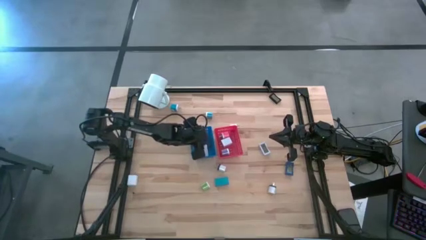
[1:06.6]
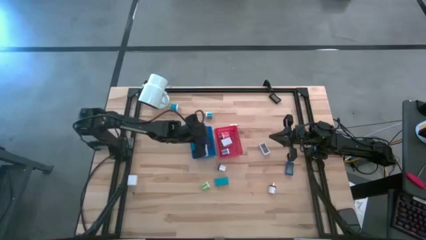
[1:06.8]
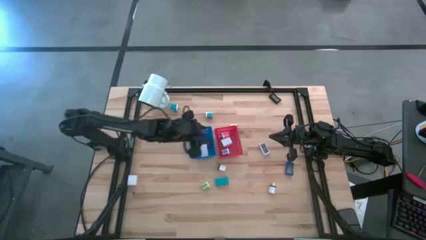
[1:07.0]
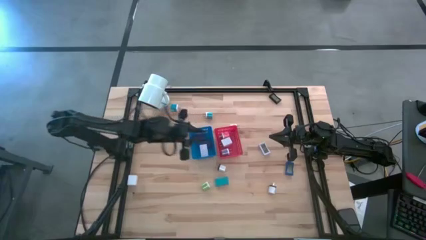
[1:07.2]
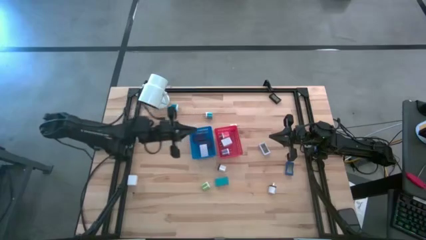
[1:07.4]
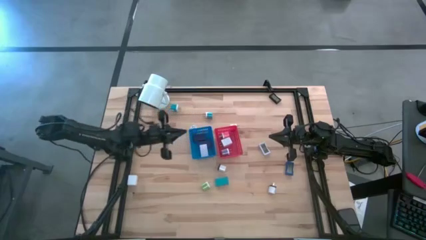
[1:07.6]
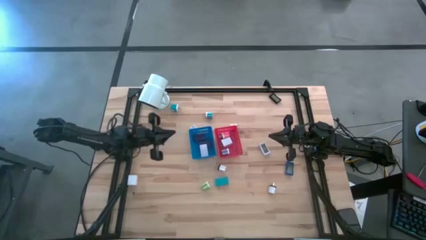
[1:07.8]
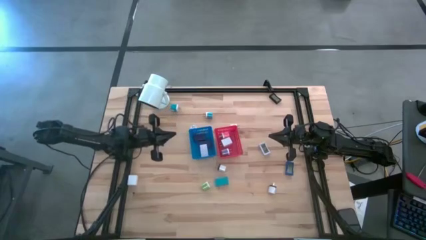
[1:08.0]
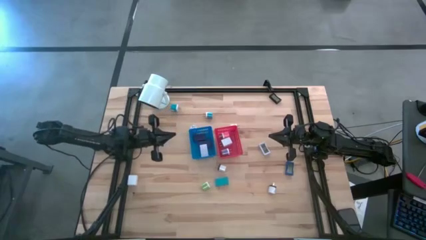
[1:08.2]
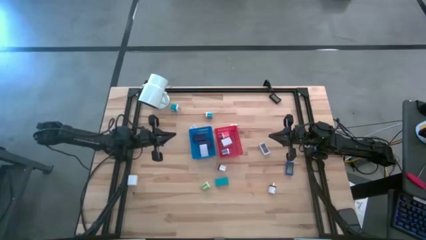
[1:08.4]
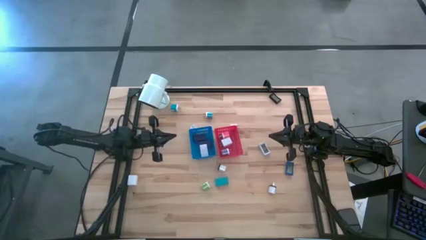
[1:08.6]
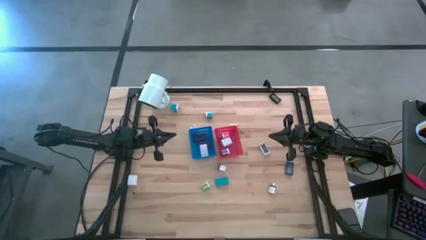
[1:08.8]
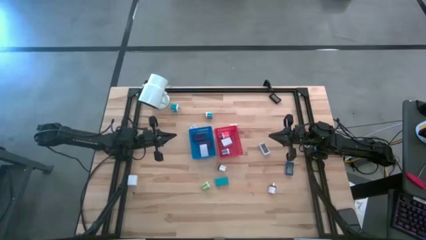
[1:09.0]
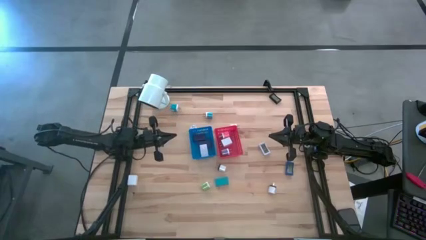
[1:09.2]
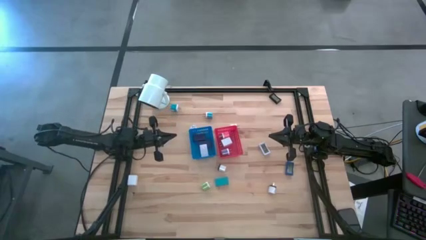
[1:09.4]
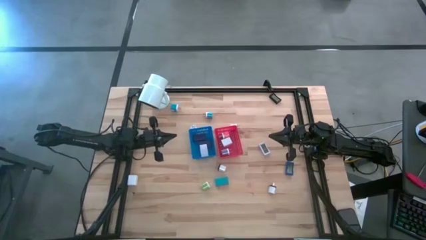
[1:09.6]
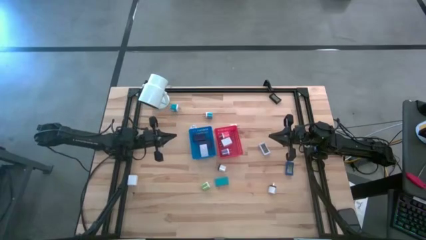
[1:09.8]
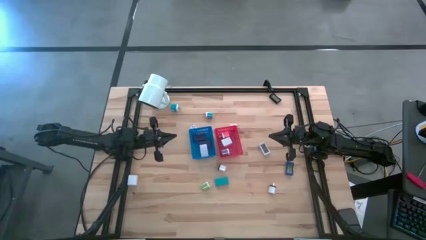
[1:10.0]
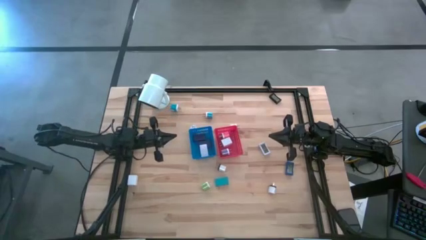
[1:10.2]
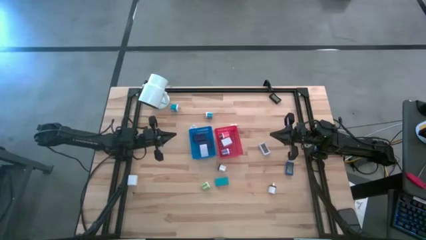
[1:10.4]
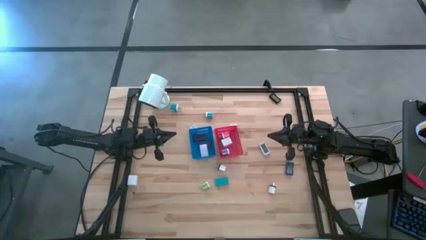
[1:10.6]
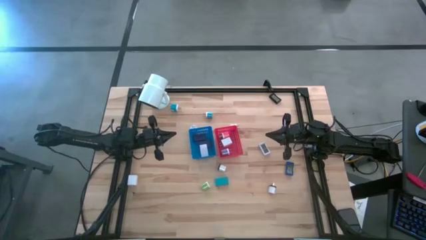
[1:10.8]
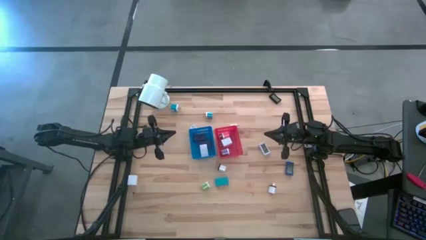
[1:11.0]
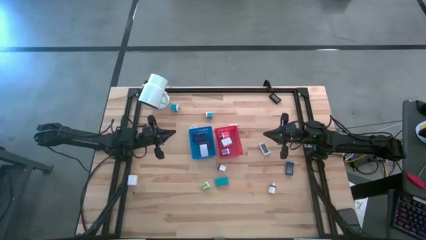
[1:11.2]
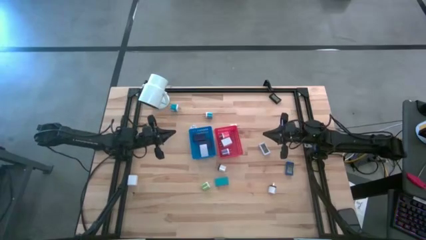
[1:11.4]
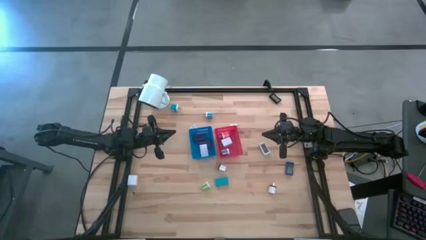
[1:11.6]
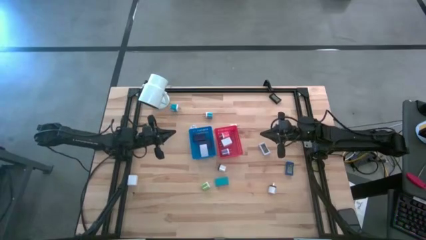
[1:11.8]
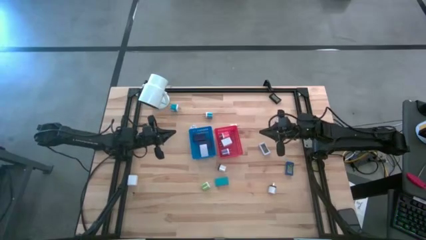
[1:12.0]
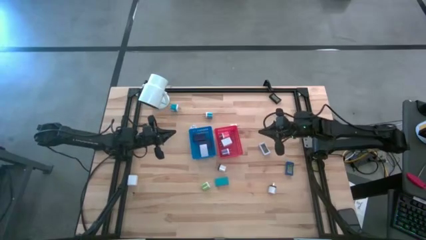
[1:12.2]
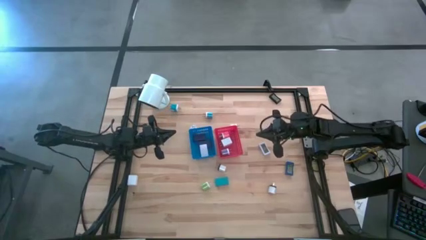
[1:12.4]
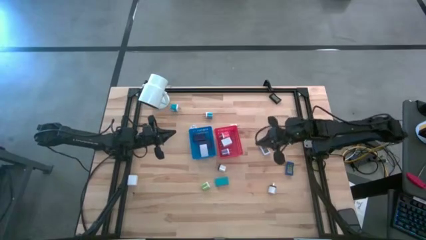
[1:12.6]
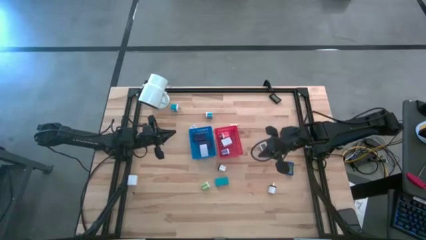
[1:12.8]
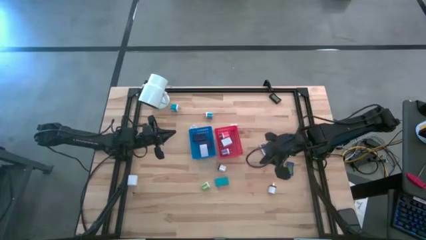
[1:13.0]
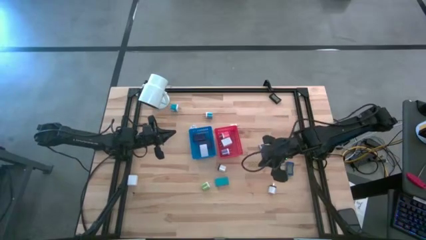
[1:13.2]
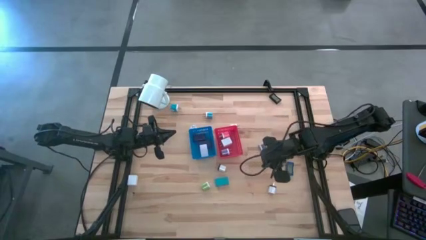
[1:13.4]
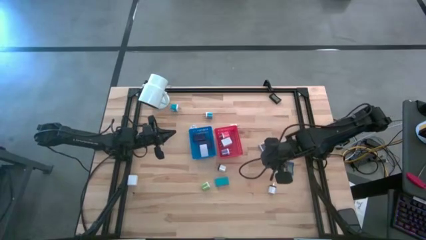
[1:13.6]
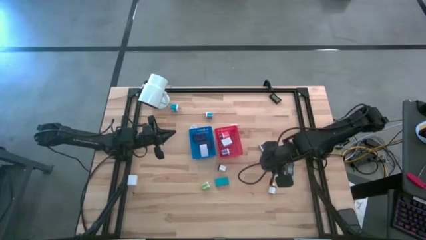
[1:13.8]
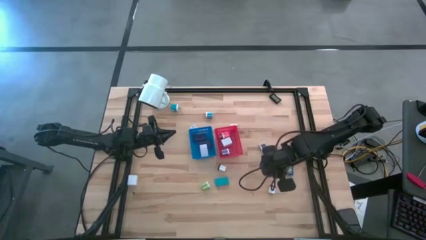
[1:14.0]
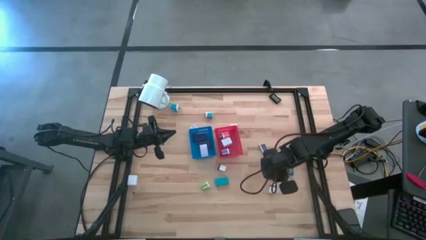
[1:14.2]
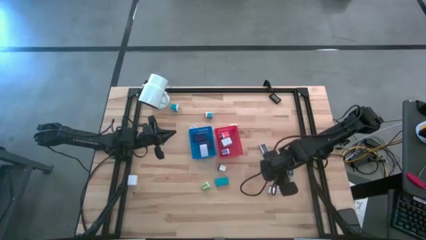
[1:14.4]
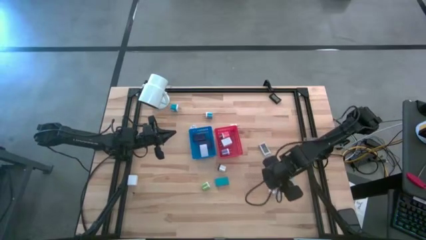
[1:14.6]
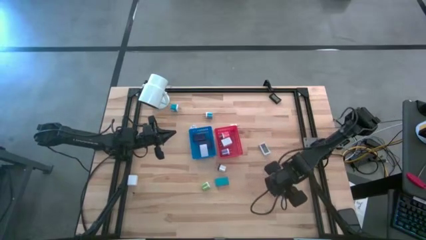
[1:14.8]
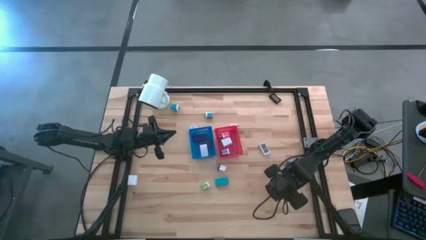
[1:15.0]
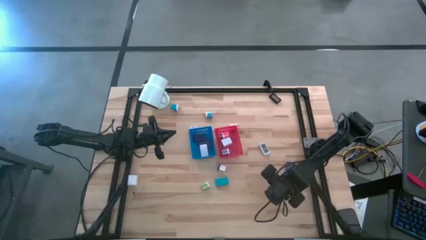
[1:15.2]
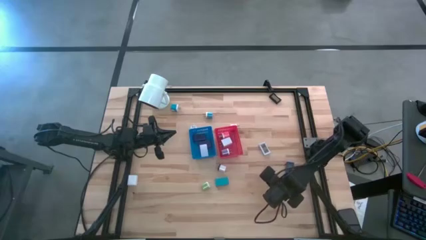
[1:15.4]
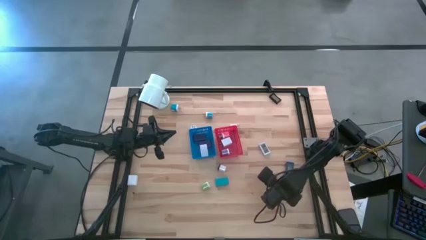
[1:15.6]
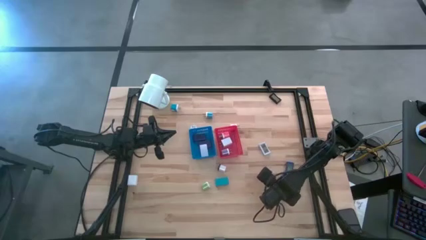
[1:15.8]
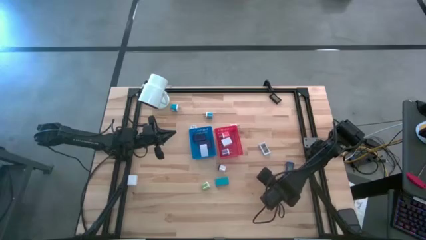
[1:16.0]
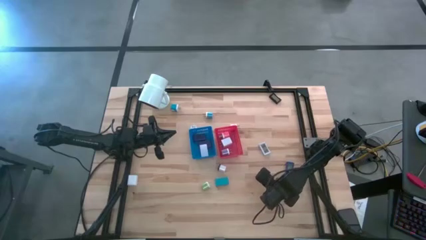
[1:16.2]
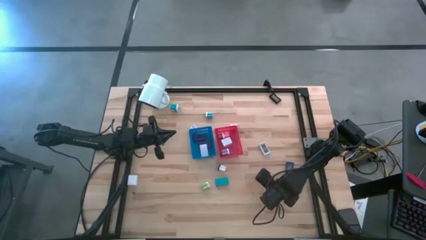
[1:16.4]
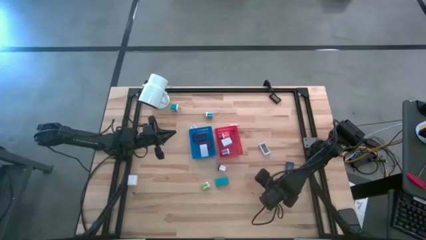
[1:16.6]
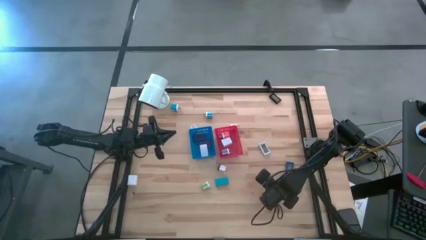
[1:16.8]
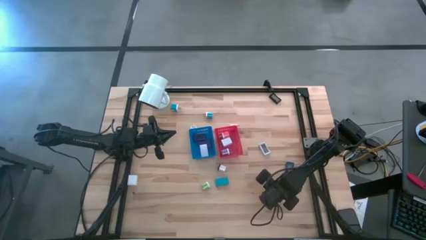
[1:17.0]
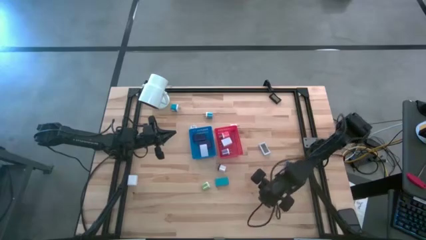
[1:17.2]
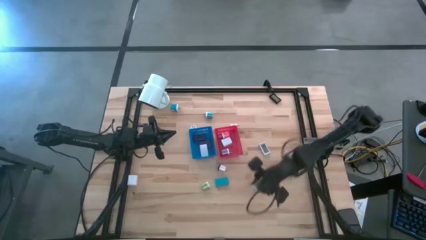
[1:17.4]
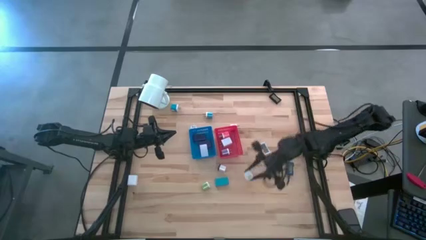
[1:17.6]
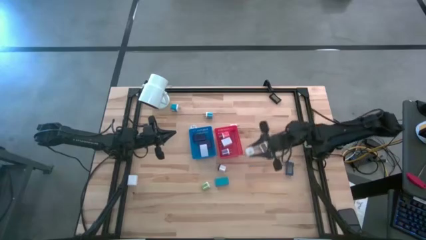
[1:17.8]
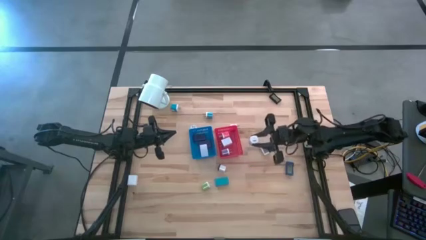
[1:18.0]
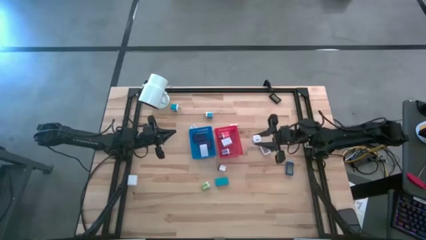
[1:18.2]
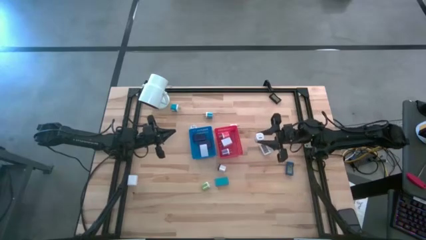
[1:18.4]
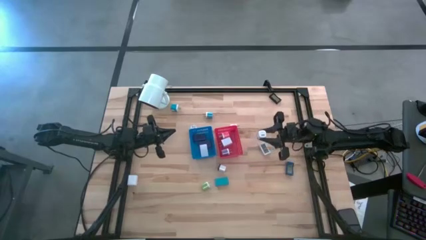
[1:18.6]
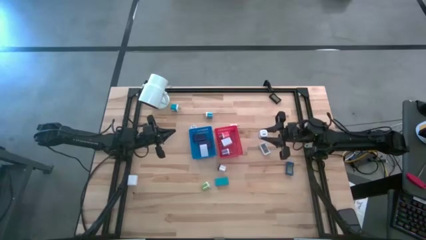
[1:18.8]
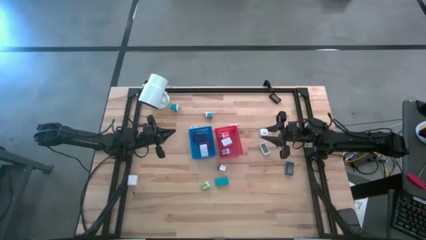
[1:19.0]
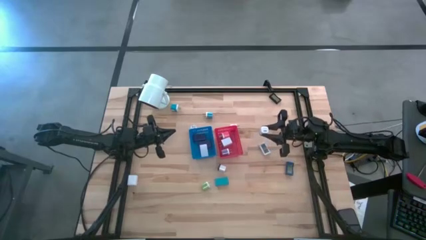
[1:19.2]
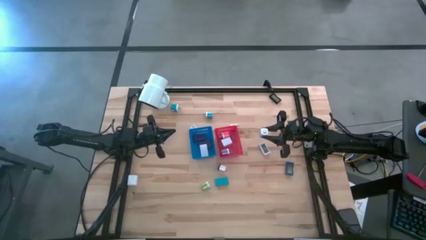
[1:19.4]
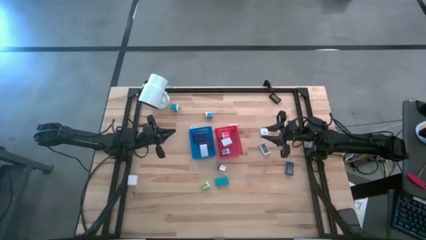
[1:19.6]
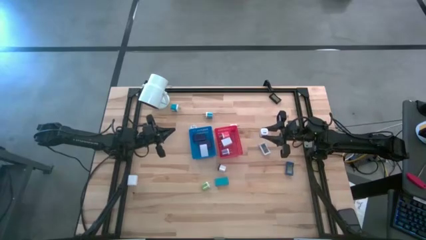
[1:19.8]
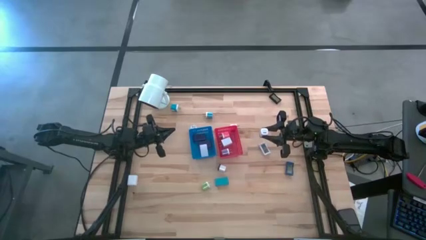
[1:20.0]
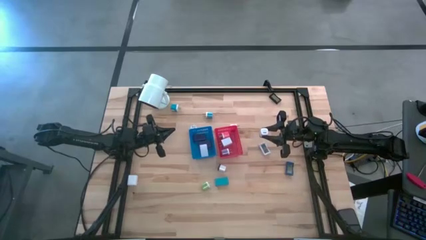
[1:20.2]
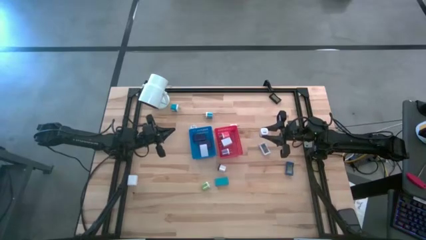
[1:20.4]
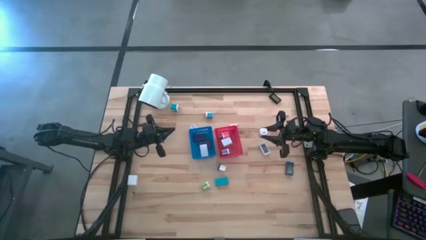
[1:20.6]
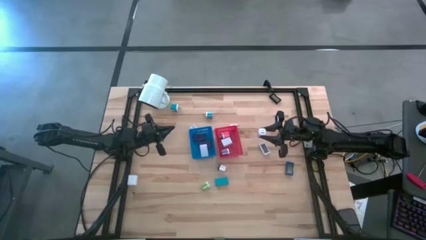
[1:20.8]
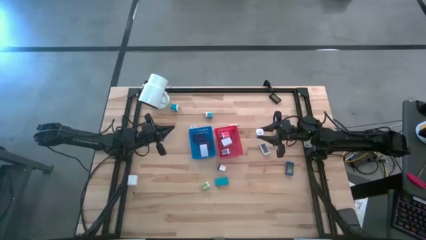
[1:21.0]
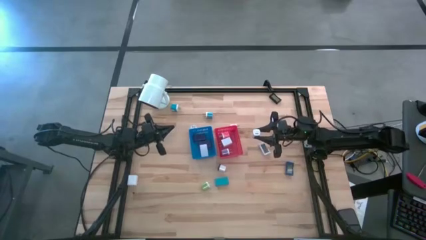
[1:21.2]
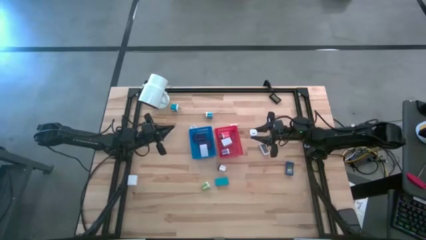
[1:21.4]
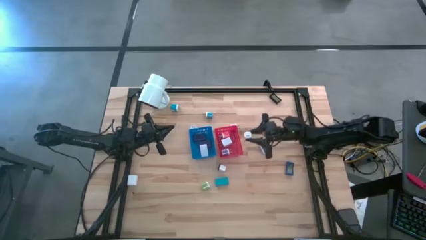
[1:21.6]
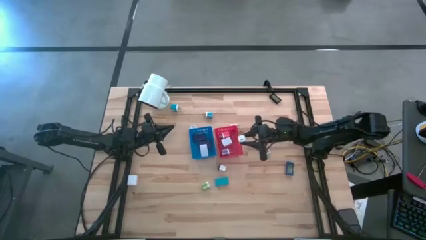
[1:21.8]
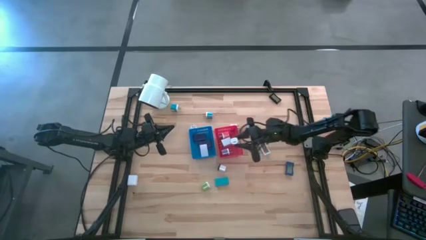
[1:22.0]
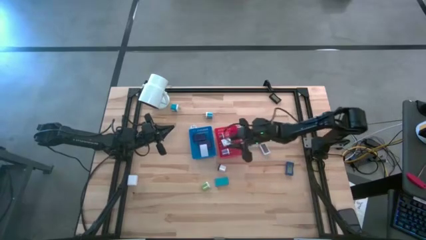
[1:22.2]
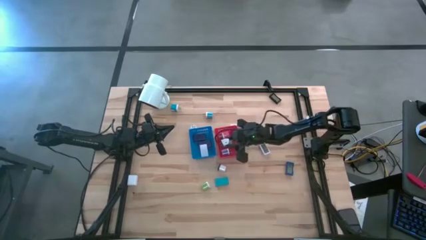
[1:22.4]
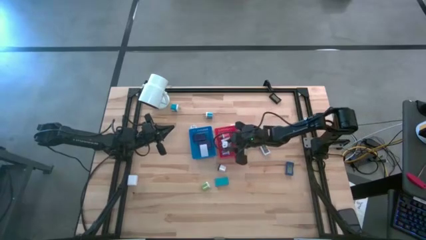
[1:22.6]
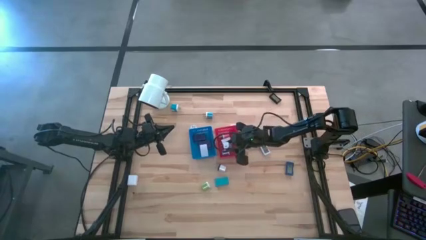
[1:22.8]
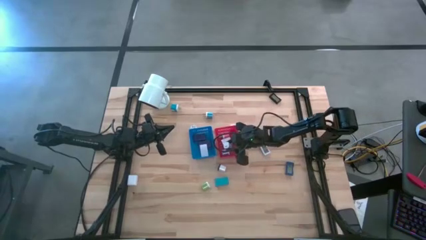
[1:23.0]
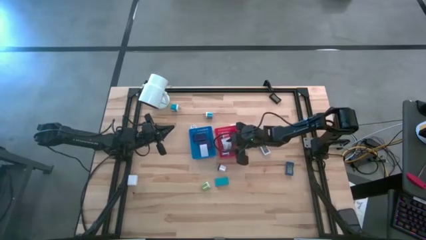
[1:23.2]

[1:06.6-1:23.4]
Task: Pick & Place Office items
Put the bottom black charger adapter into the red bin
